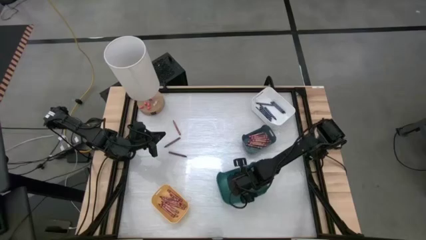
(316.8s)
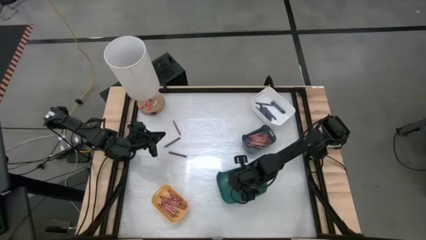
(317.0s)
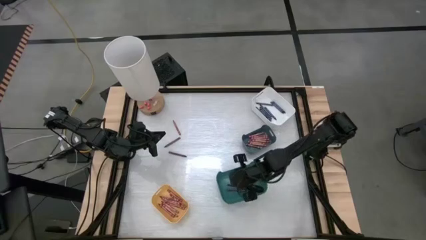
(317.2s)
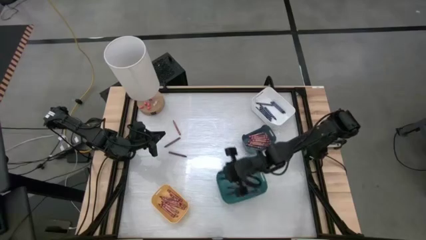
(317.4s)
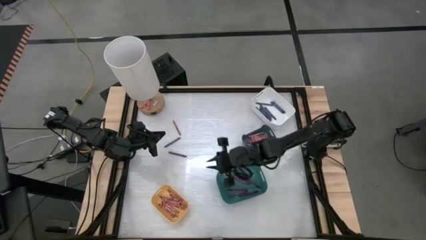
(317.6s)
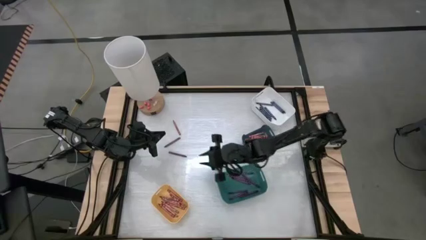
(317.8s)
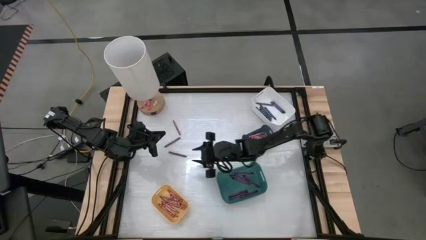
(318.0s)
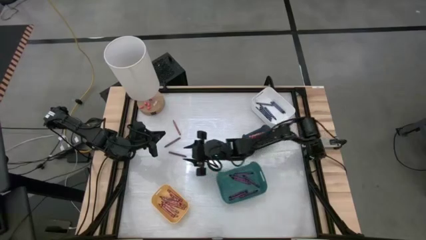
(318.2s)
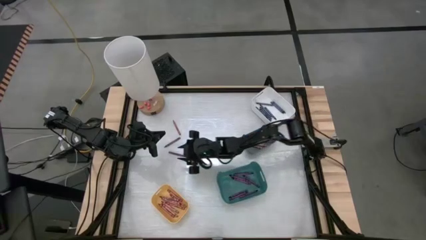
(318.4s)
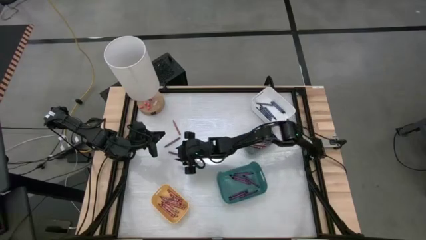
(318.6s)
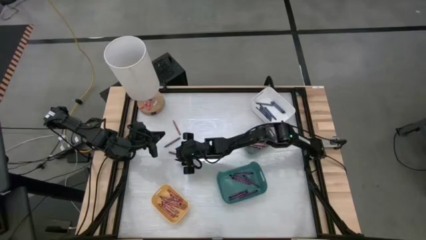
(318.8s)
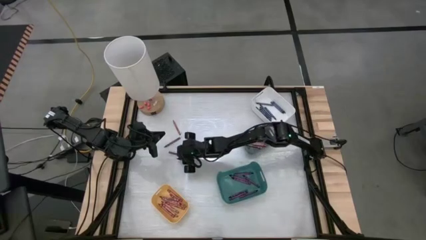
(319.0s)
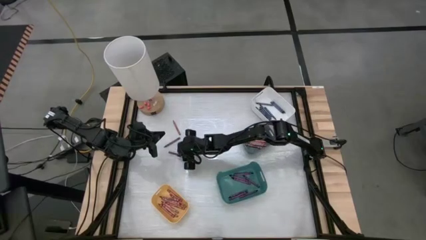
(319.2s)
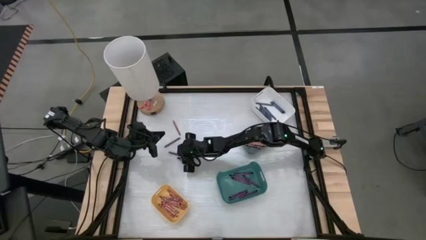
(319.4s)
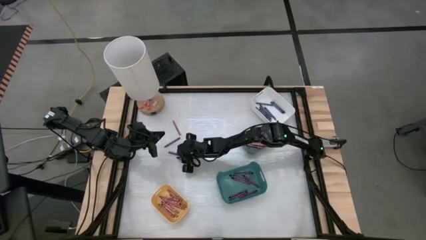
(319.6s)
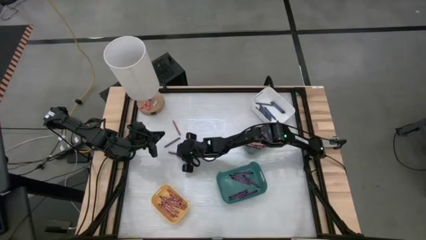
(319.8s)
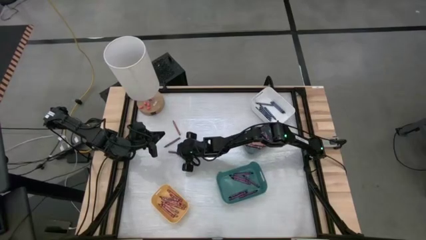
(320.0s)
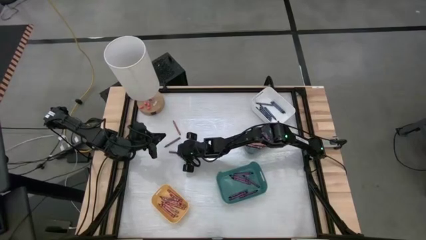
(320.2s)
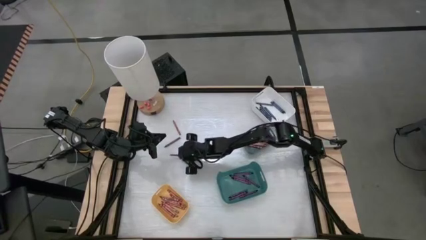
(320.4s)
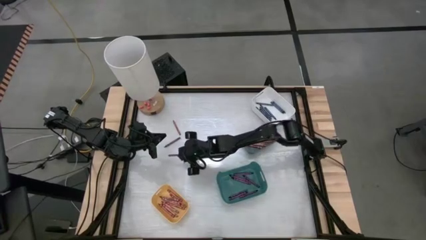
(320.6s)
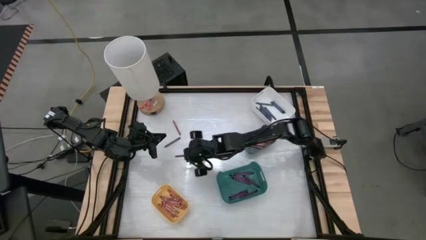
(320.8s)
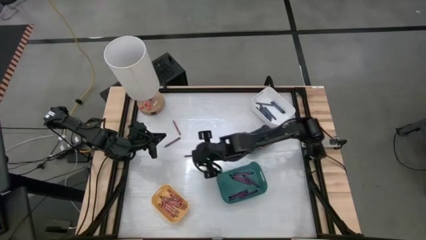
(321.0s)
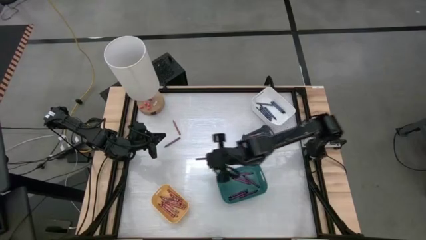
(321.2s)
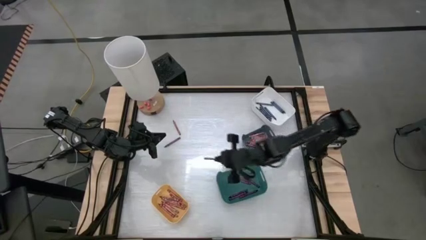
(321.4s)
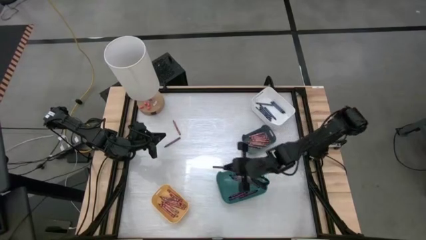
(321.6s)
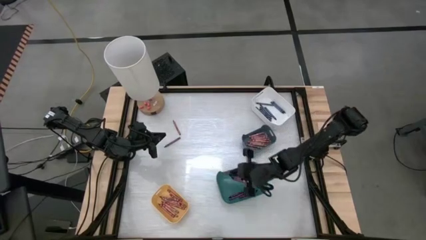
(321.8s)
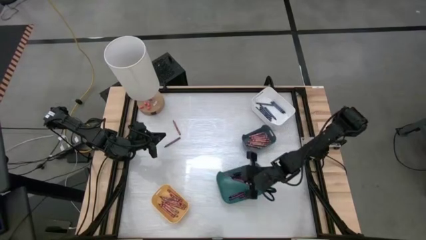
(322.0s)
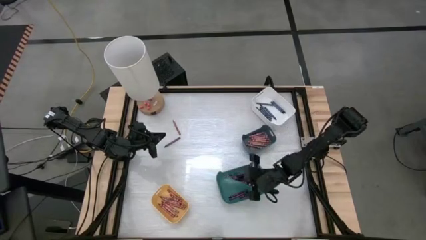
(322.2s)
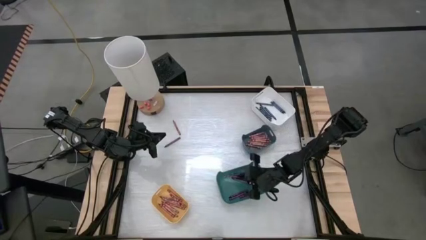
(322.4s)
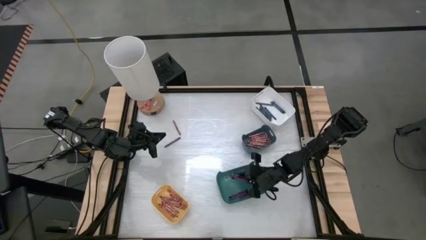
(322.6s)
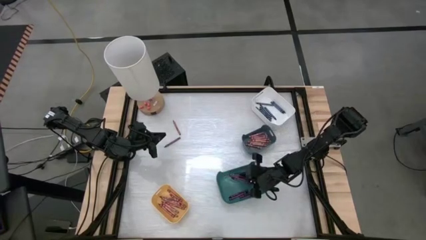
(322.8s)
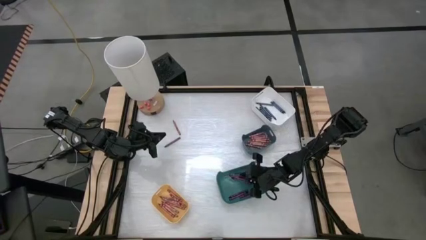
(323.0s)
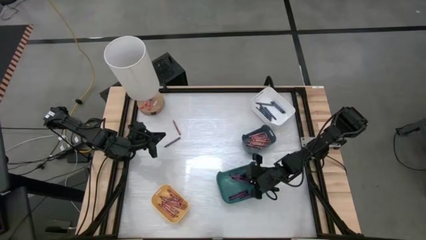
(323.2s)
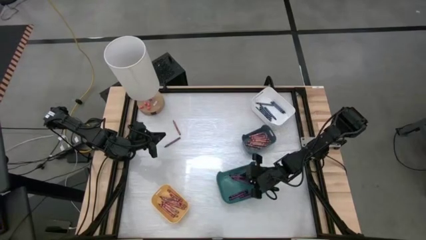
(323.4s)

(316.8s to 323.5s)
Task: Sort crayons
Put the purple crayon into the blue bin

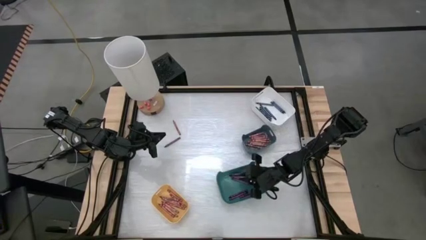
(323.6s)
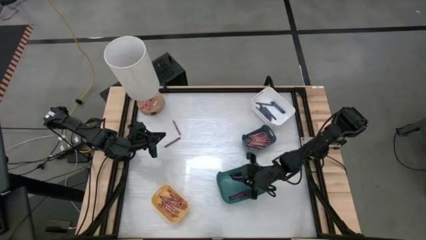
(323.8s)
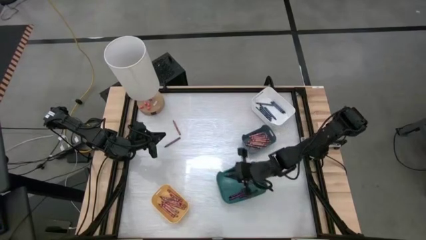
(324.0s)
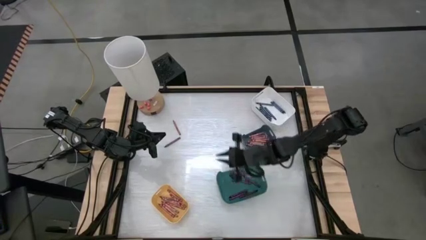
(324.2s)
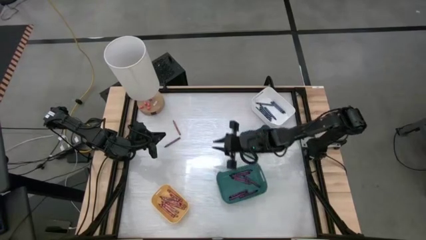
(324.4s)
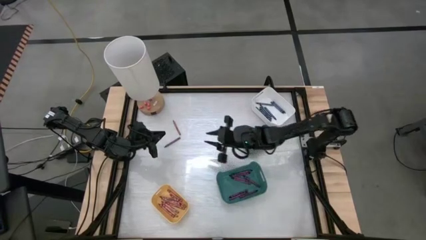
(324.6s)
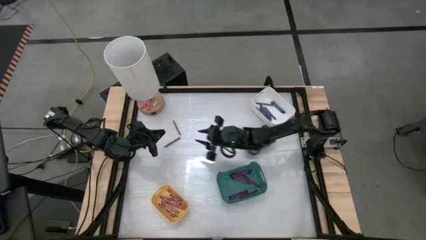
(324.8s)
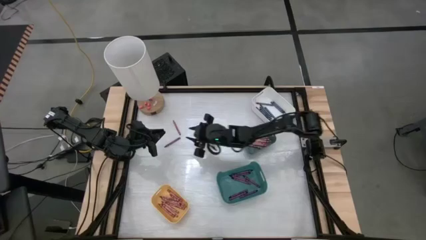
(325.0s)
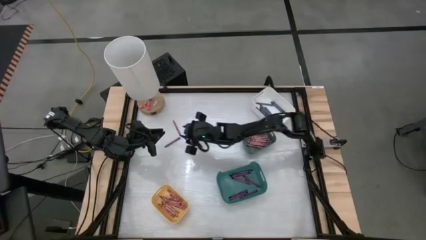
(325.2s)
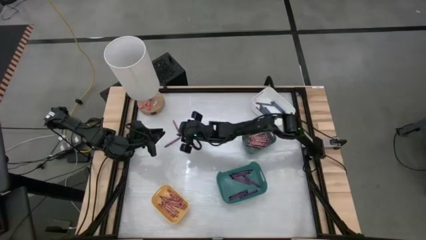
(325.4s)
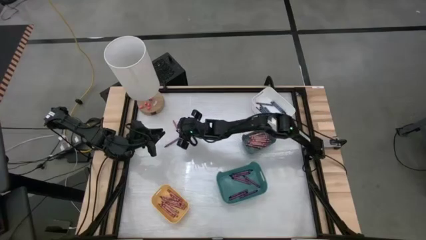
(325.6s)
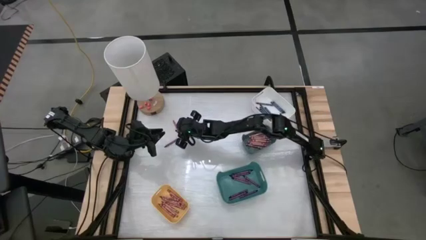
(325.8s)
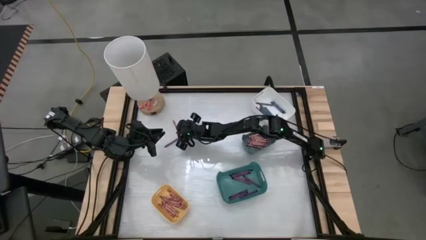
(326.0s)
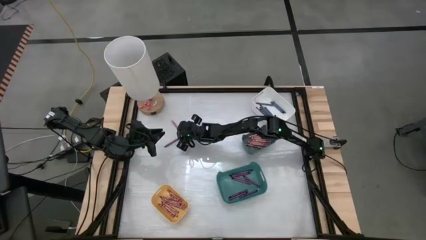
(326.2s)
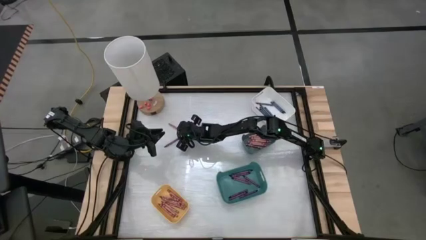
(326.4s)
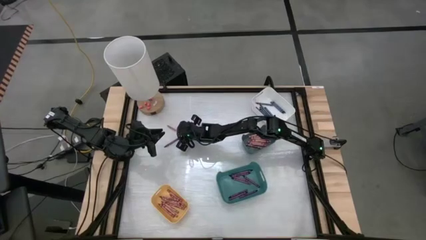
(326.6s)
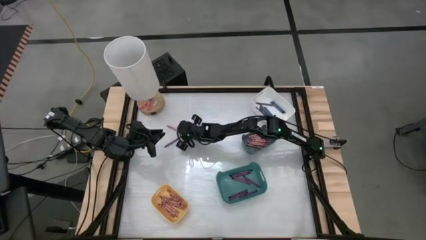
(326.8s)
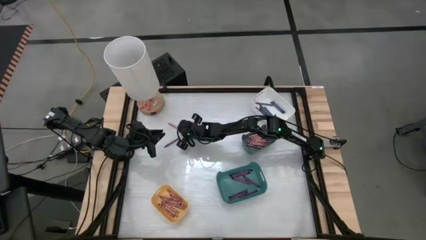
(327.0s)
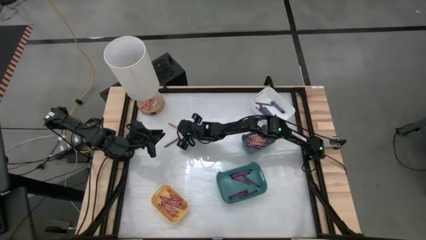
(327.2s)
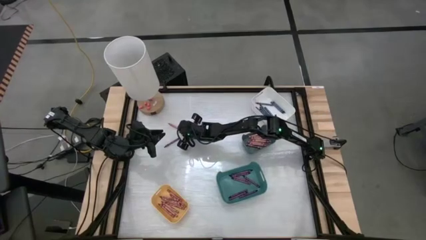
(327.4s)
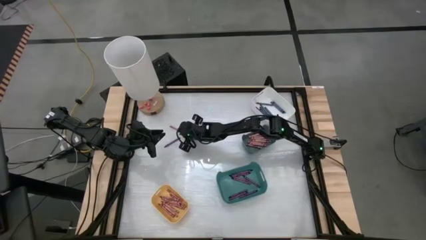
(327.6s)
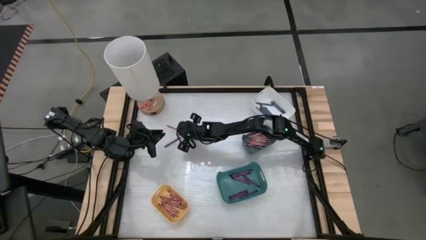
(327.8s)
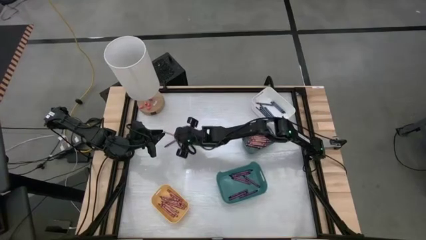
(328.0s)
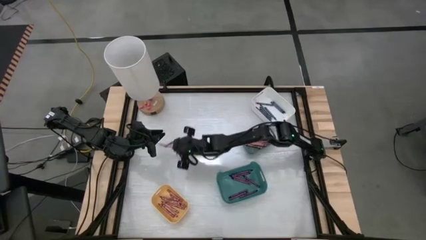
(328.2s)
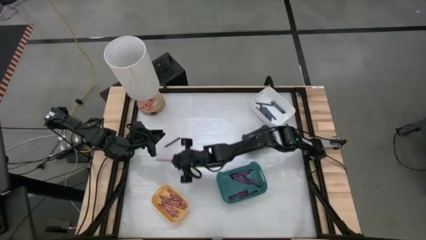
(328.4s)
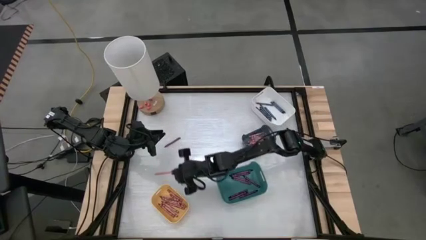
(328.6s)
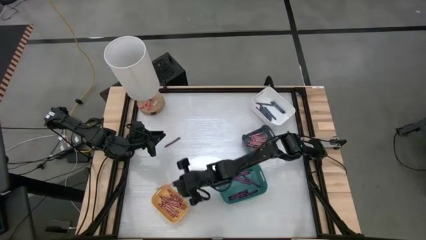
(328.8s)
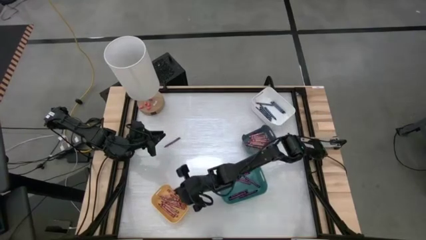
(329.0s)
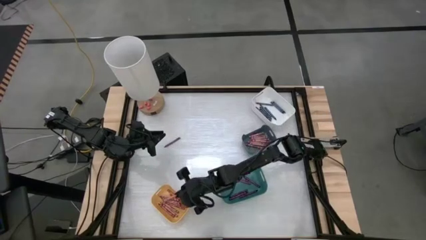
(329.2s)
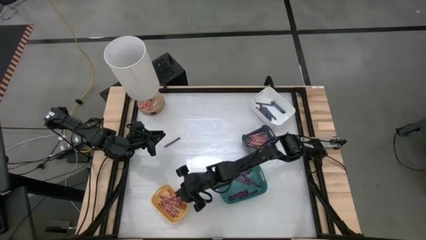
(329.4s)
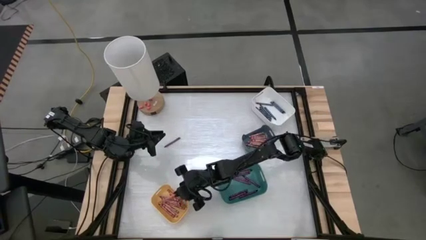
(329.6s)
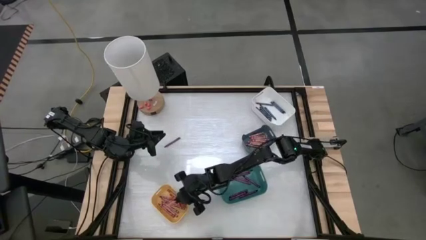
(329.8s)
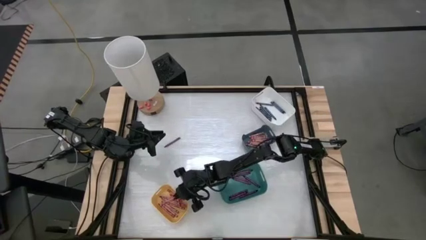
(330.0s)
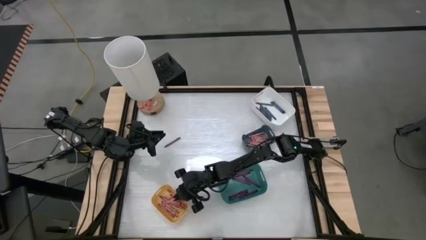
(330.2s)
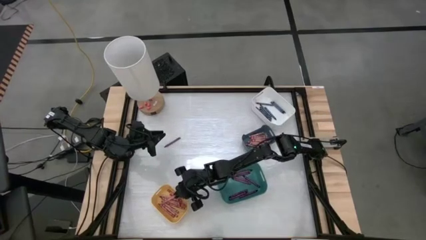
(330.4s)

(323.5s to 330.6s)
Put the red crayon into the yellow bin

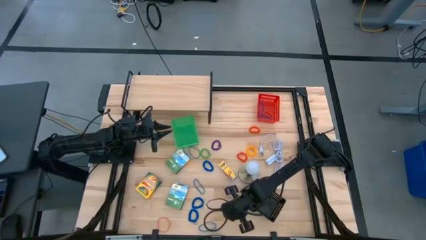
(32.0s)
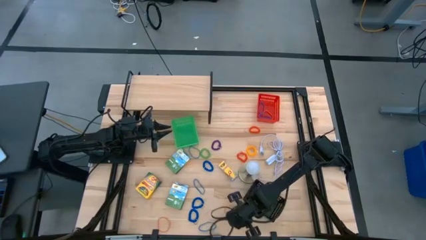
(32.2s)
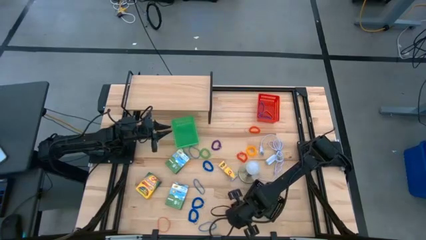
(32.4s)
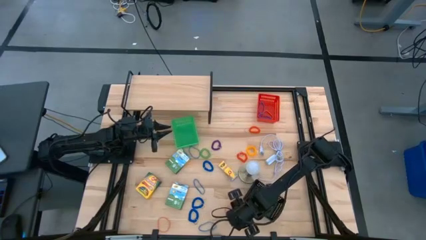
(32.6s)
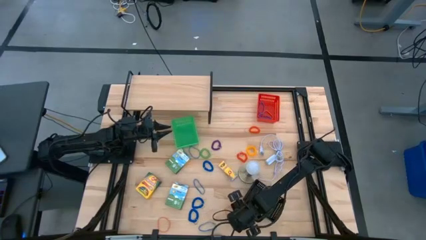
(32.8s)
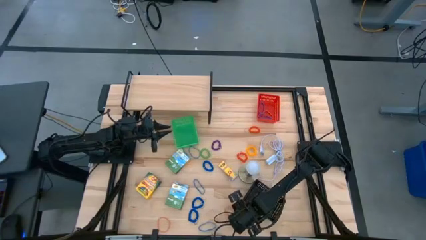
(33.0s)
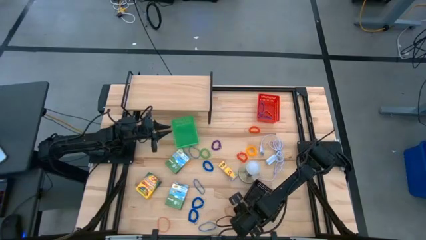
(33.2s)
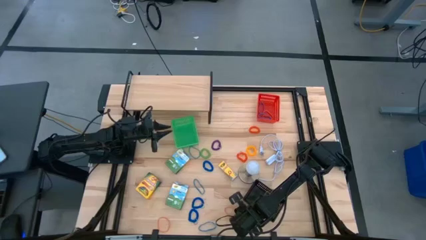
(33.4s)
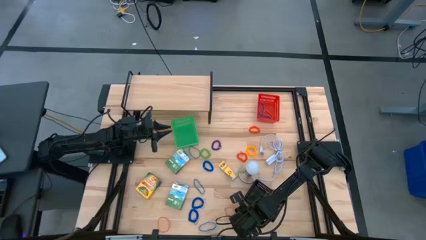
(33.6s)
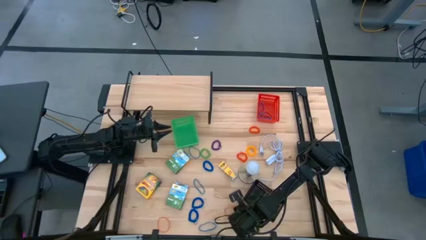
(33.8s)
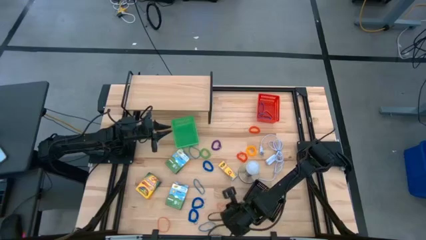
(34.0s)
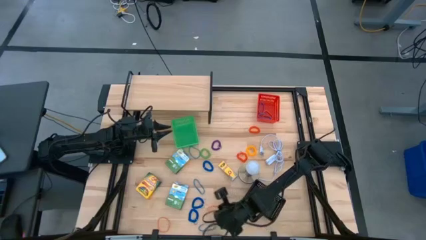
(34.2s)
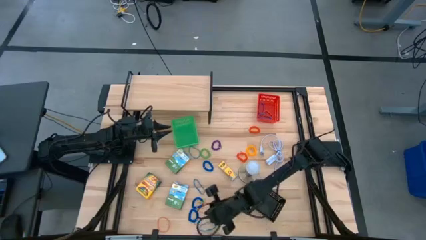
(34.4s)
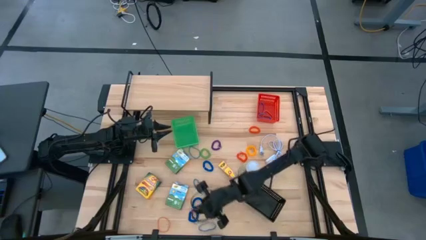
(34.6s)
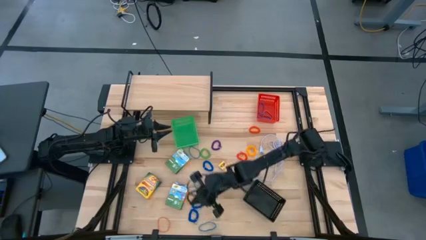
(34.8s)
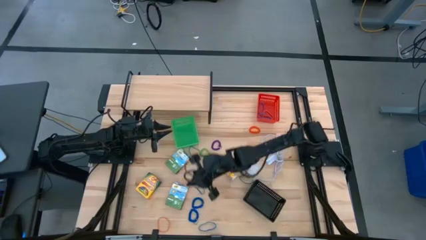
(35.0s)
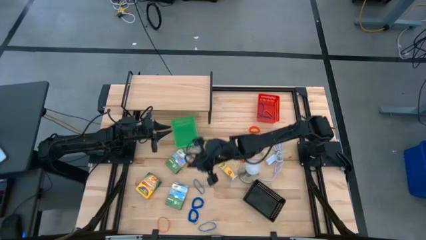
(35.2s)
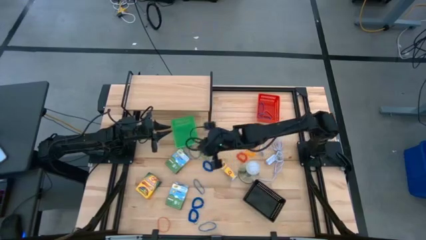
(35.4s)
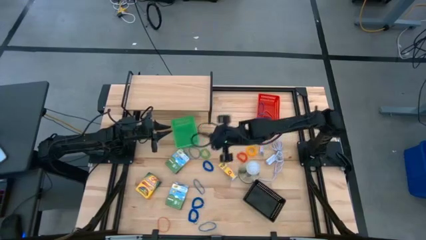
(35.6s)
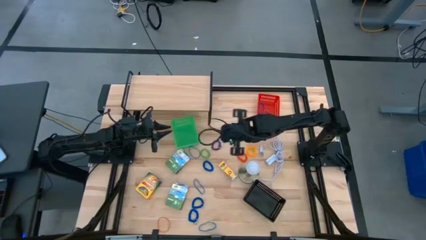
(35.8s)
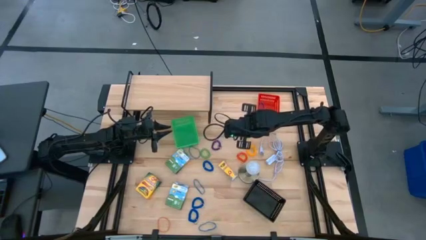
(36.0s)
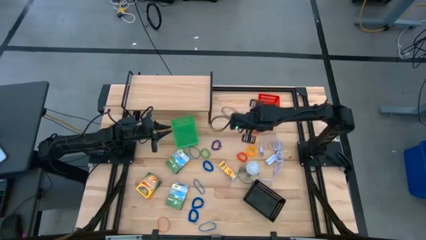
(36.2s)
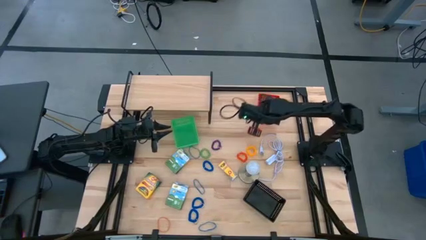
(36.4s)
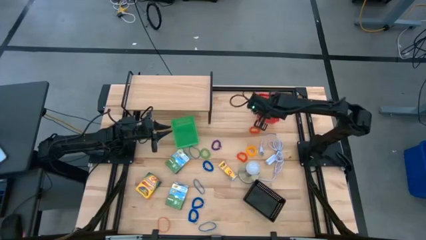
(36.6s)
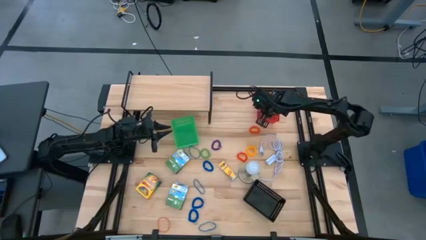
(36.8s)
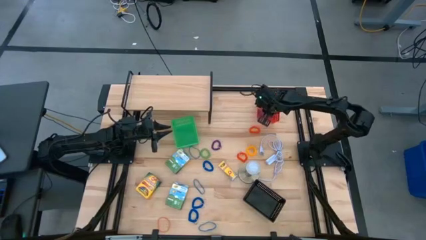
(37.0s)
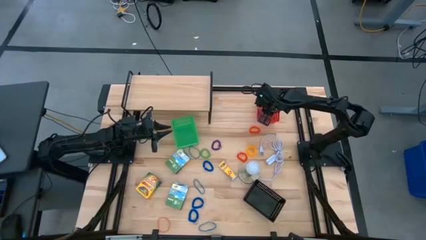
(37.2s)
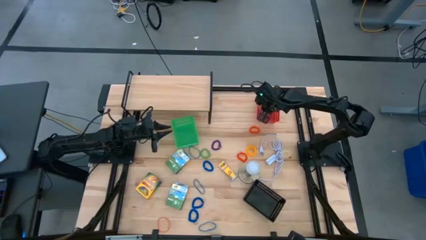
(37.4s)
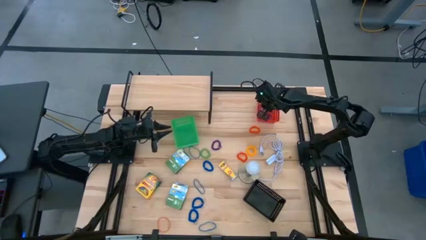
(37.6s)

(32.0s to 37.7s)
Task: Pick & Place Office Desk Supplies
Put the orange rubber band into the red basket
